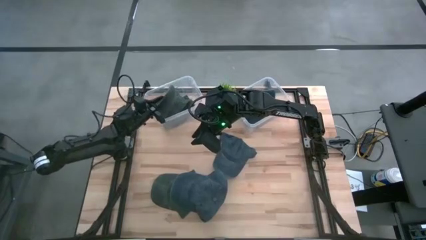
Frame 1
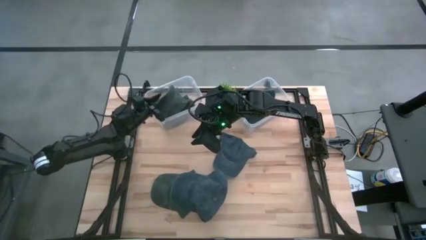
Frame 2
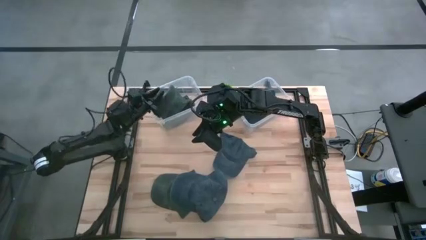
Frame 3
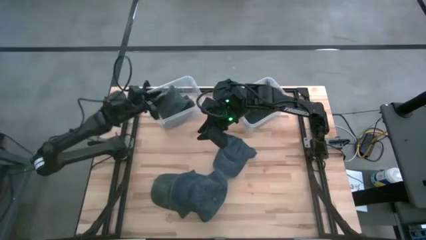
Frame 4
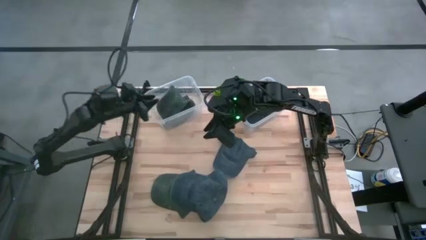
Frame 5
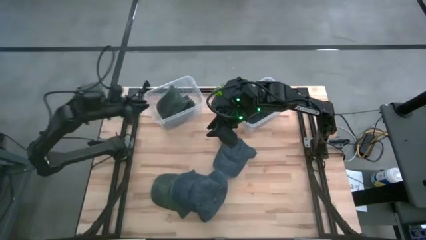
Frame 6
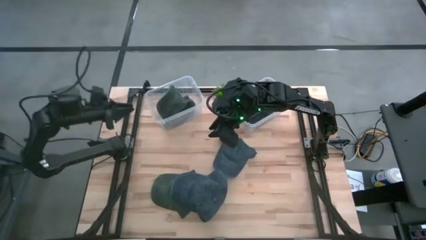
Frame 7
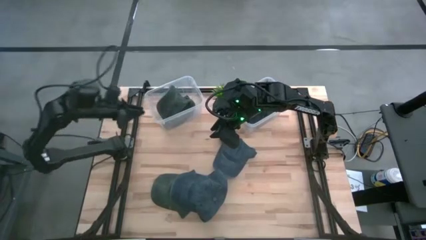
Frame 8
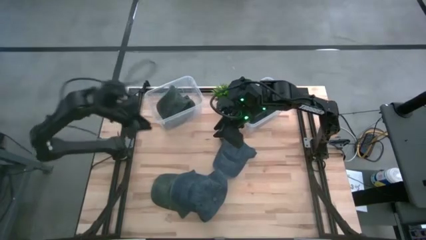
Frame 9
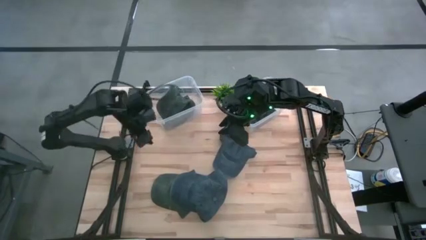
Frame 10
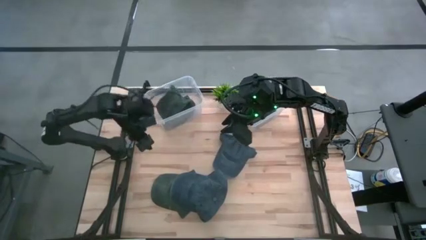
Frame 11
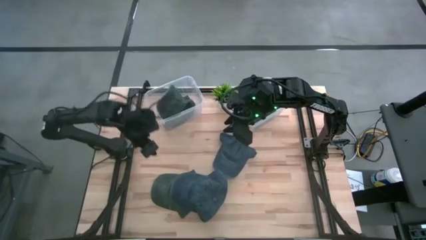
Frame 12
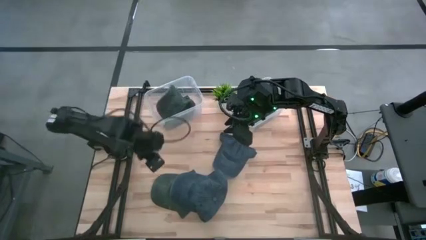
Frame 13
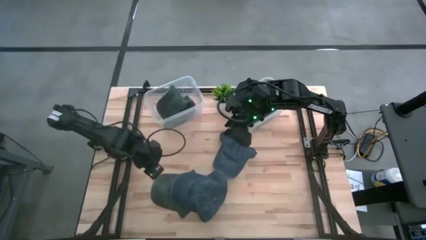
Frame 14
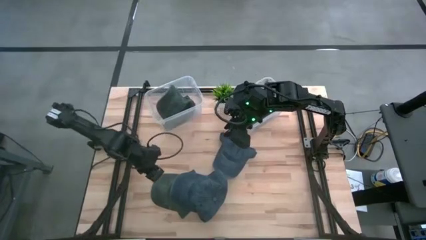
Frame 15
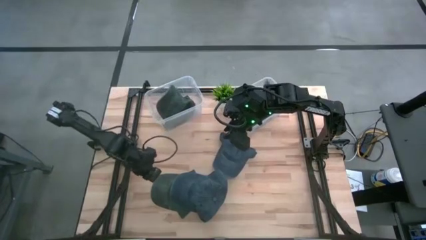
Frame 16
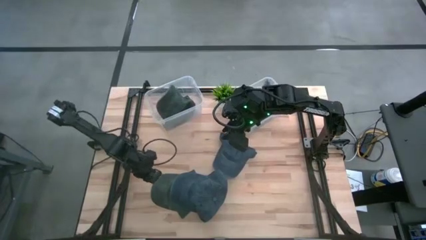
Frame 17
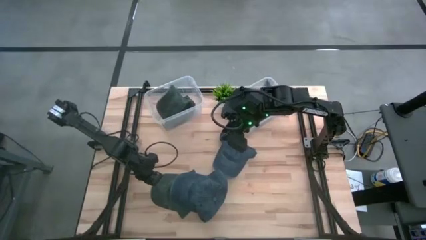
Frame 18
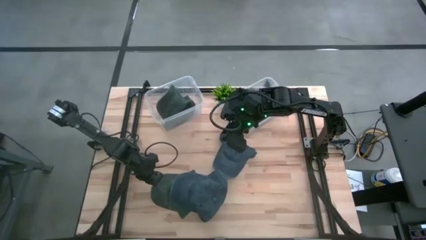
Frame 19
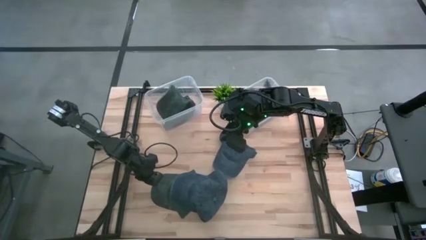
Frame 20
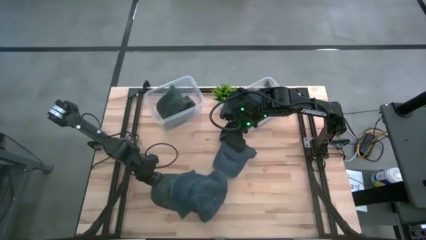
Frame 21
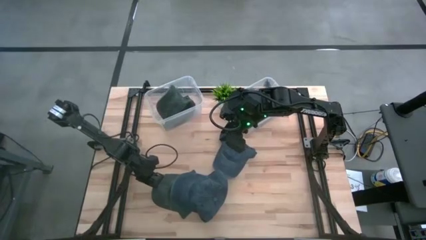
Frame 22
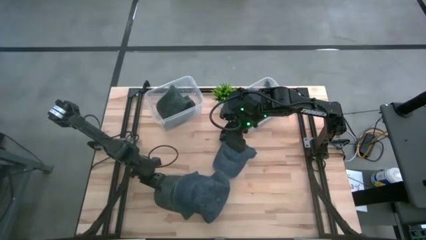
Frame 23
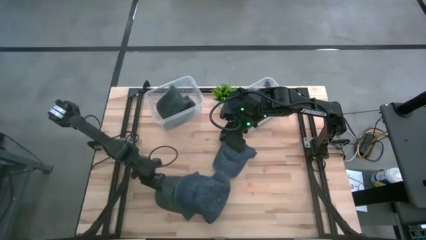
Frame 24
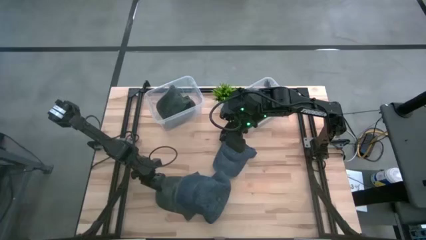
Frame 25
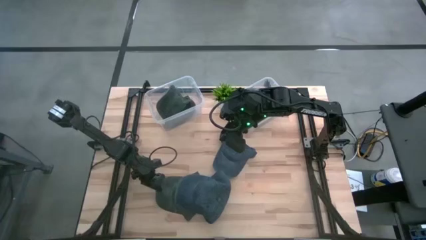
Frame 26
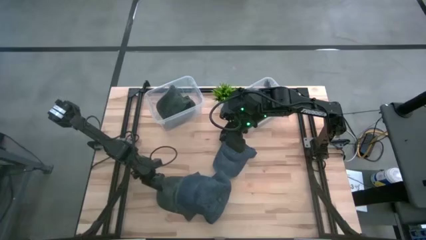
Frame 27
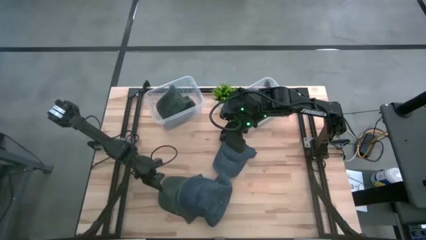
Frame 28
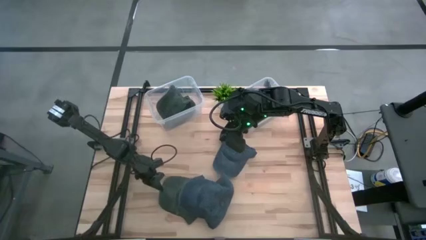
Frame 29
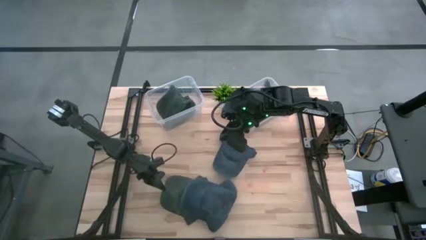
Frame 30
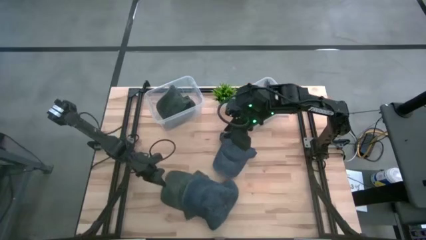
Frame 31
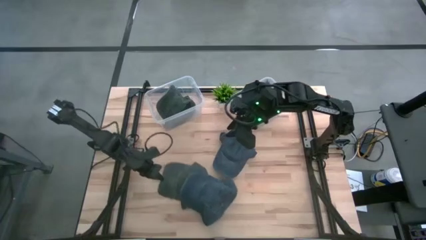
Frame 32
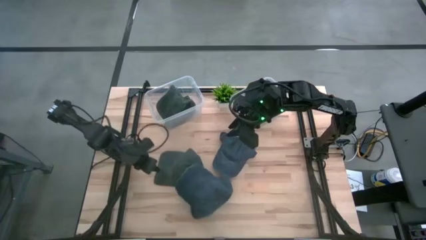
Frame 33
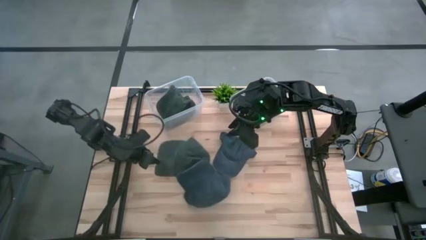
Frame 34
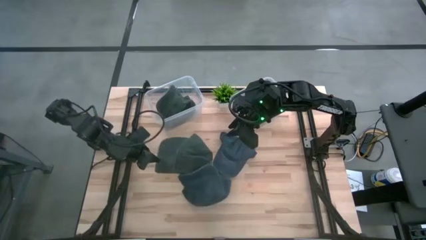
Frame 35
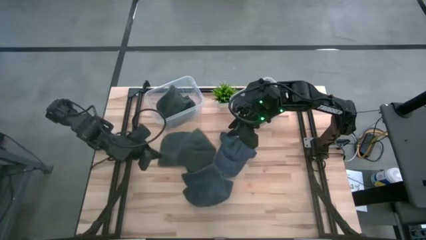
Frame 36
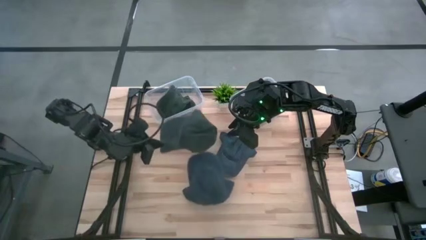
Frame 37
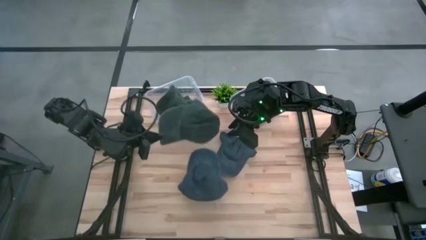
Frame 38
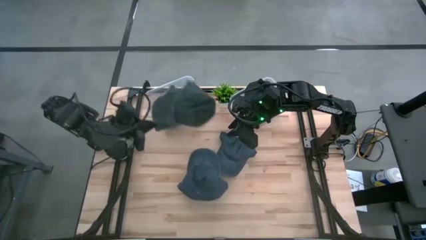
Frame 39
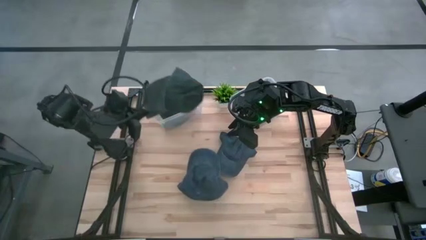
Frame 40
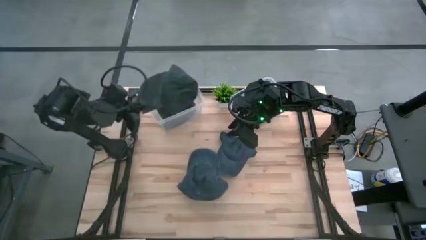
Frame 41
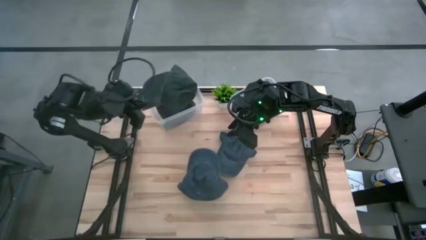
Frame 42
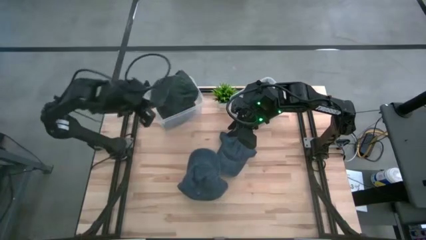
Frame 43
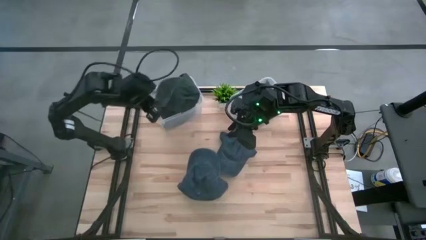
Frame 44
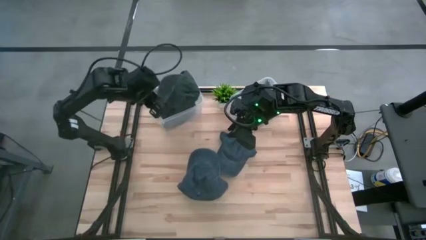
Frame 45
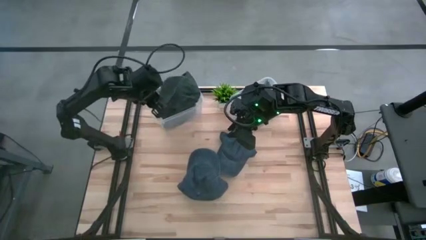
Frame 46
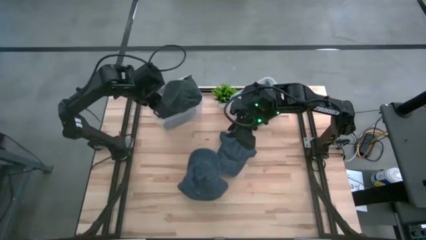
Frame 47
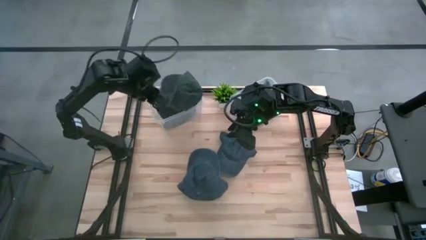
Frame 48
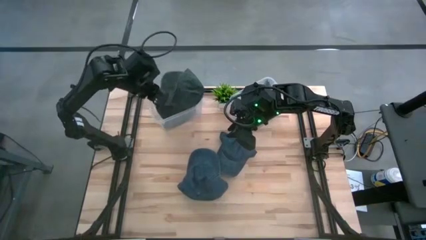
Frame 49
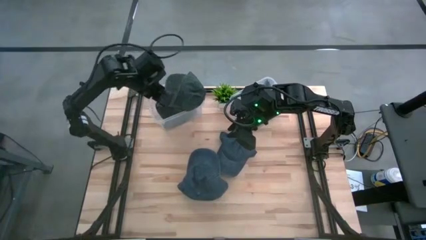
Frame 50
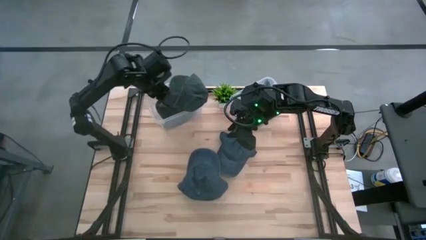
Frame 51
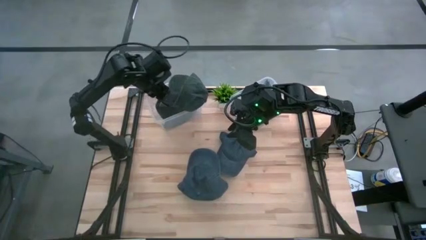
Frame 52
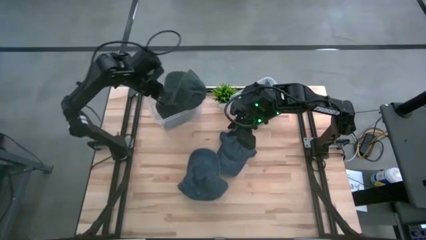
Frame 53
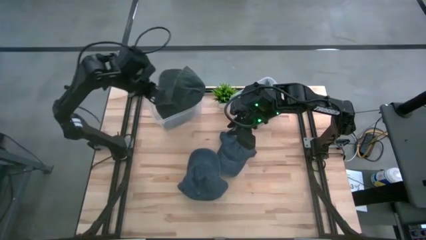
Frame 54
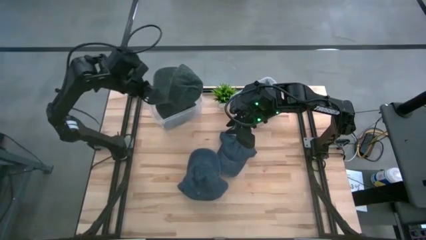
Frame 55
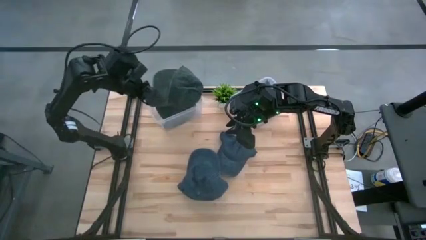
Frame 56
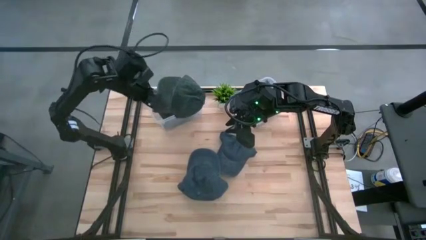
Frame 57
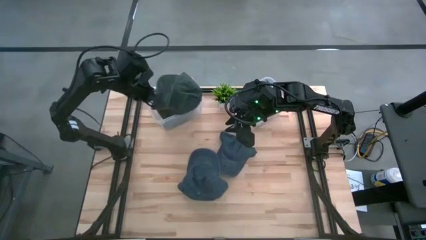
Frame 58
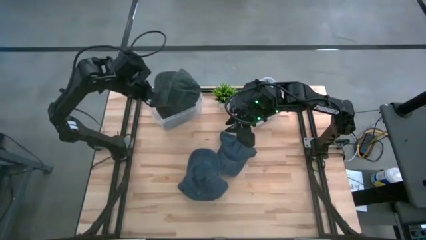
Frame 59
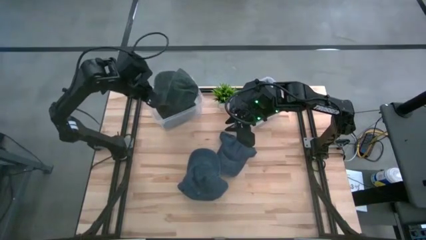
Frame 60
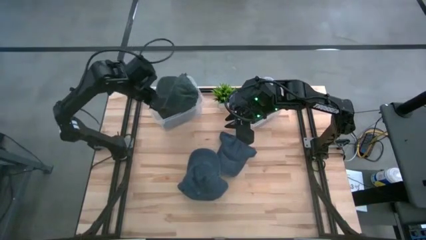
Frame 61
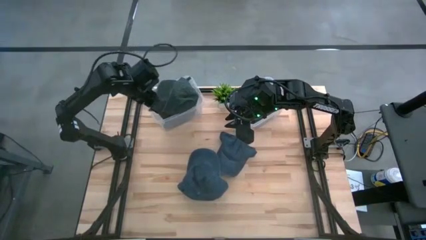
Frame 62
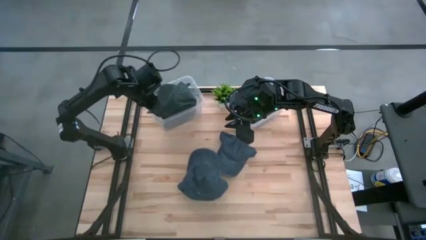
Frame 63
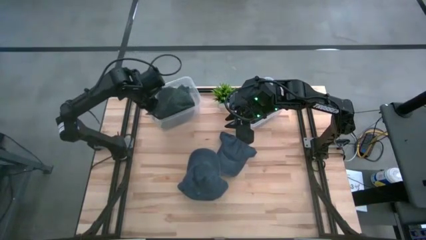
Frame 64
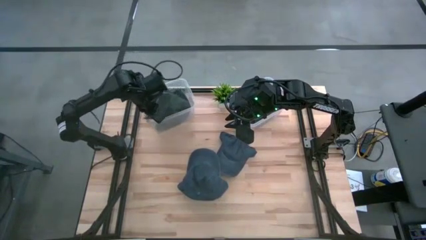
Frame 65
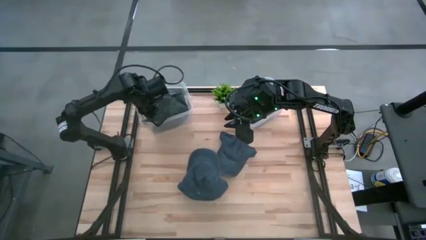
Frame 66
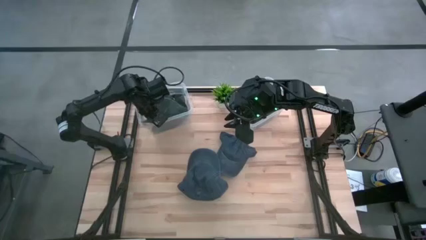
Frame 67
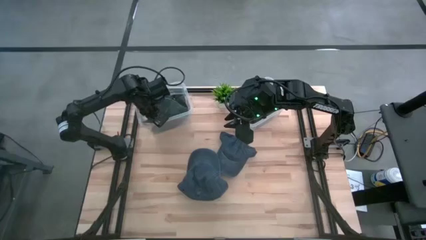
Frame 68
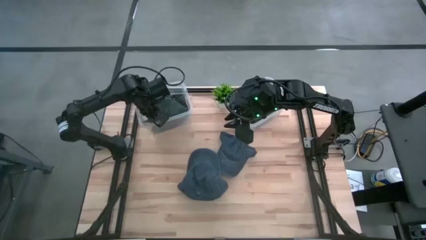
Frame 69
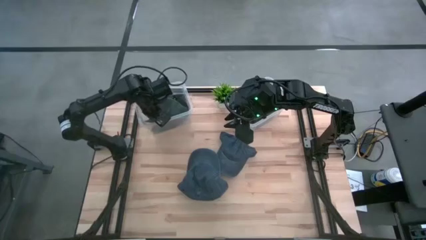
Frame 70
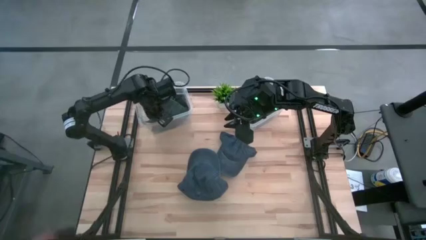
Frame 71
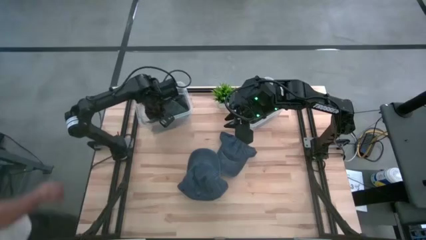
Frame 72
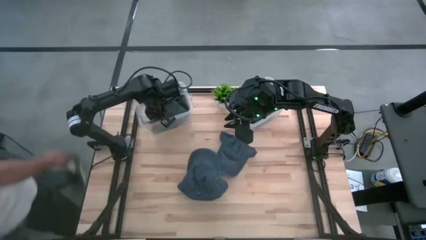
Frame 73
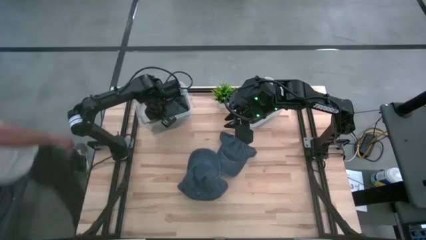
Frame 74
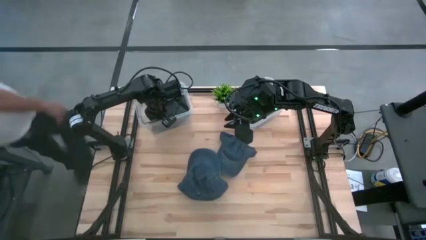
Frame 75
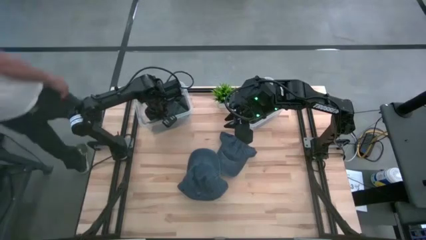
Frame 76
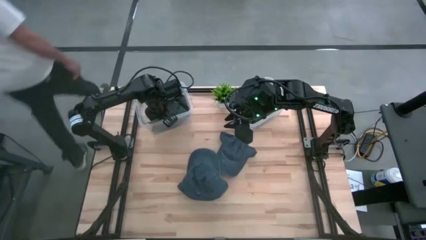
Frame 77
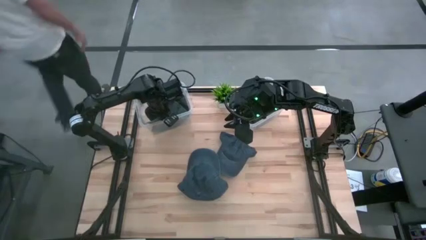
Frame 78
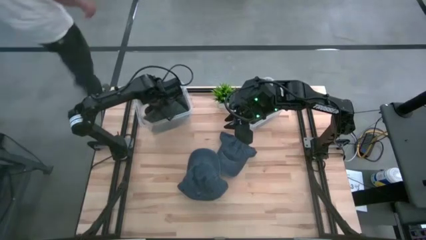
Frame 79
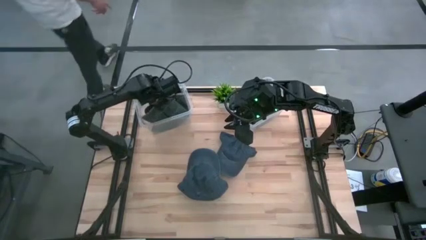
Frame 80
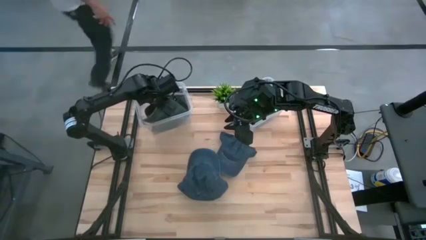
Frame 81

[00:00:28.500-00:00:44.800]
Task: Pick & Place hat
Put the black cap into the left transparent bin
